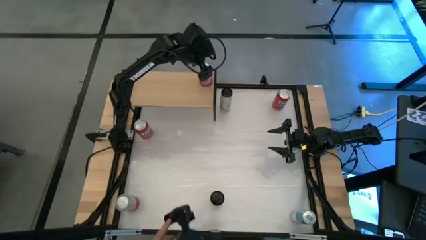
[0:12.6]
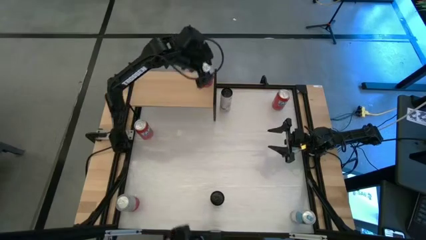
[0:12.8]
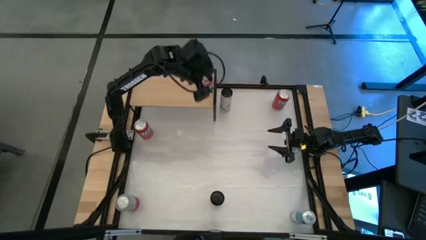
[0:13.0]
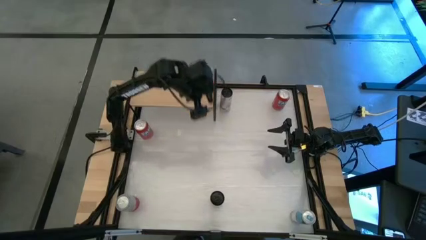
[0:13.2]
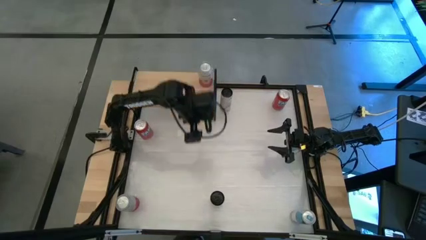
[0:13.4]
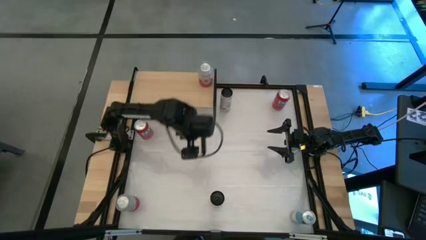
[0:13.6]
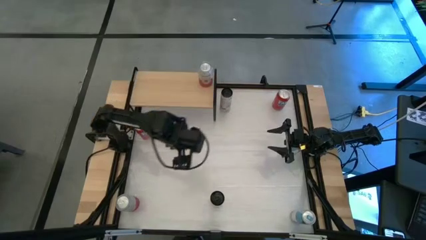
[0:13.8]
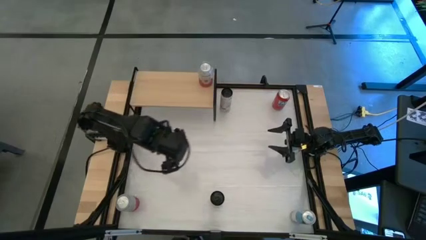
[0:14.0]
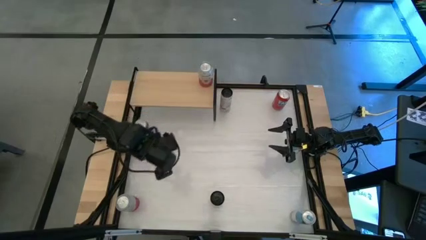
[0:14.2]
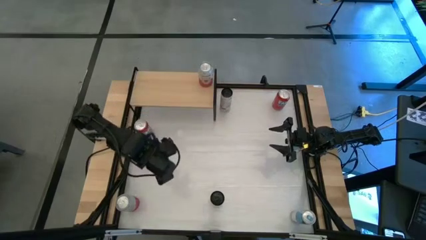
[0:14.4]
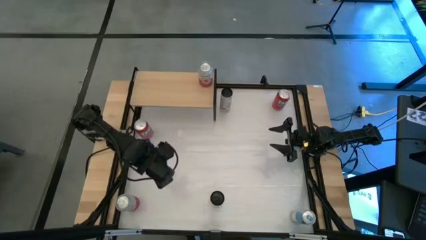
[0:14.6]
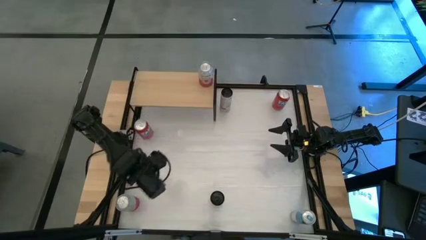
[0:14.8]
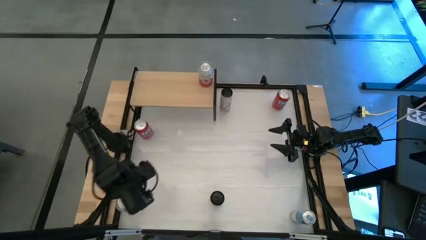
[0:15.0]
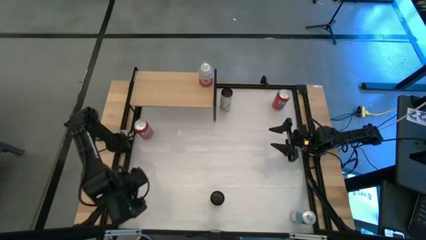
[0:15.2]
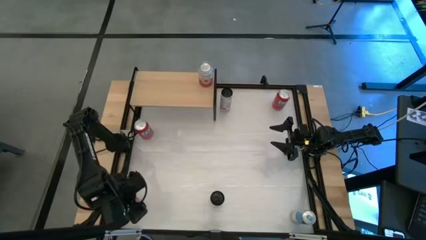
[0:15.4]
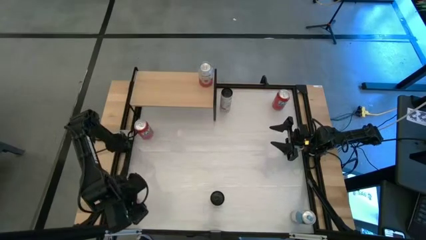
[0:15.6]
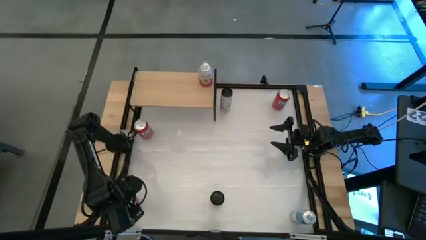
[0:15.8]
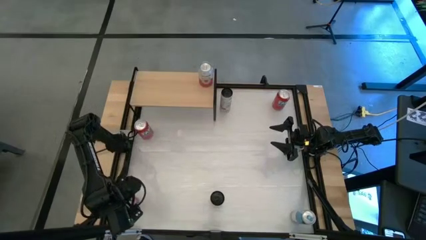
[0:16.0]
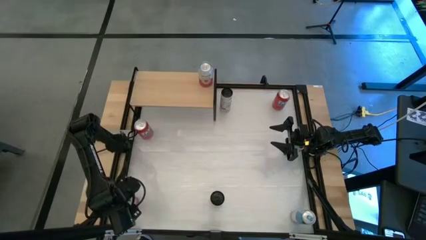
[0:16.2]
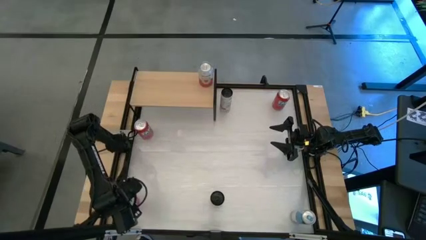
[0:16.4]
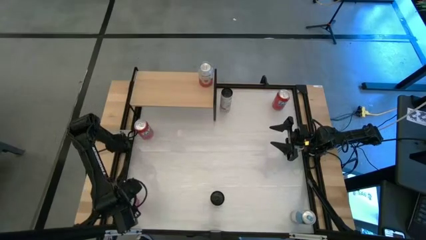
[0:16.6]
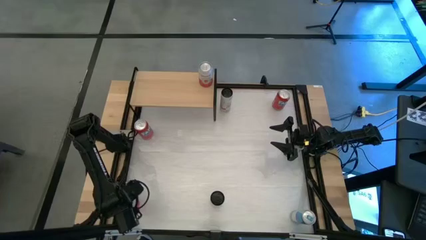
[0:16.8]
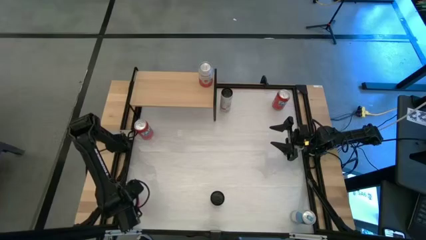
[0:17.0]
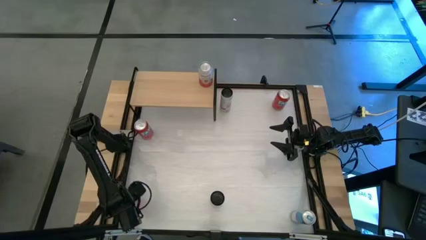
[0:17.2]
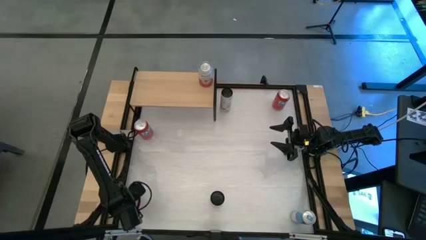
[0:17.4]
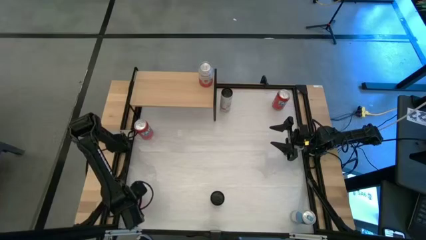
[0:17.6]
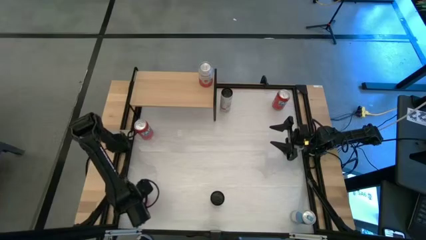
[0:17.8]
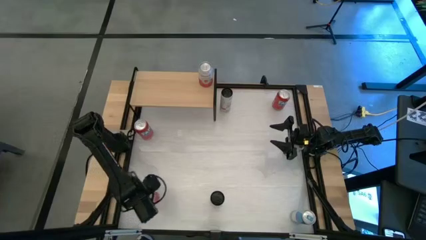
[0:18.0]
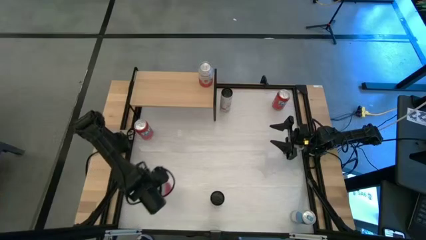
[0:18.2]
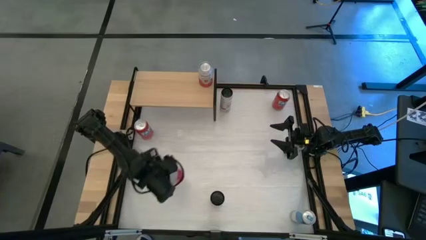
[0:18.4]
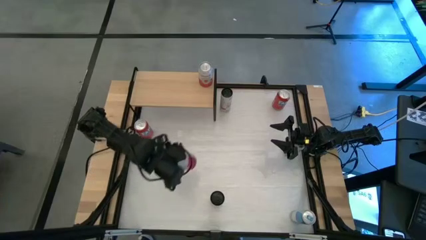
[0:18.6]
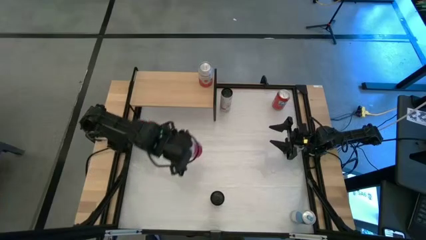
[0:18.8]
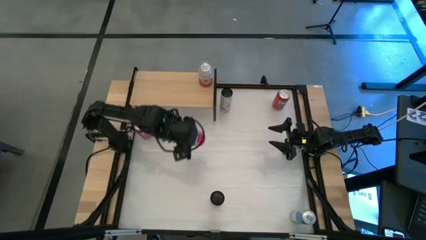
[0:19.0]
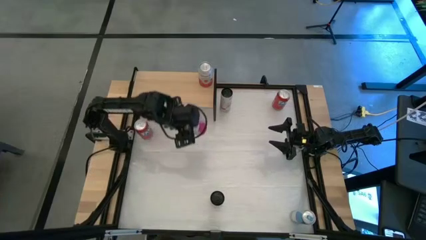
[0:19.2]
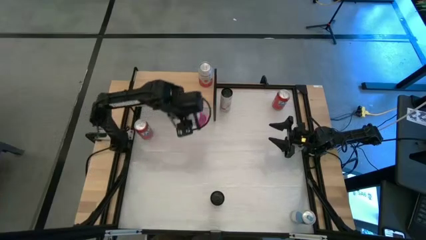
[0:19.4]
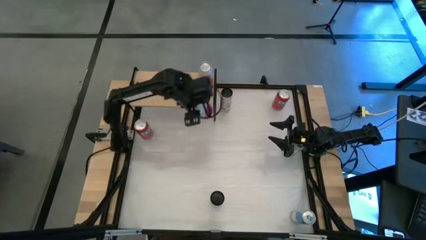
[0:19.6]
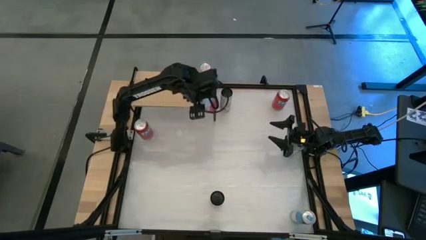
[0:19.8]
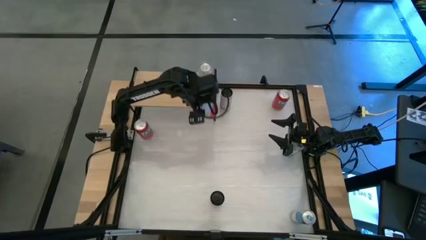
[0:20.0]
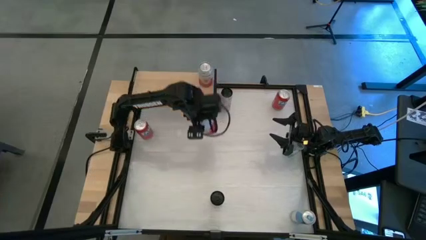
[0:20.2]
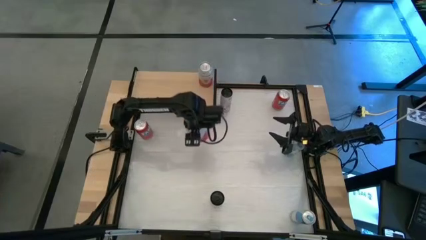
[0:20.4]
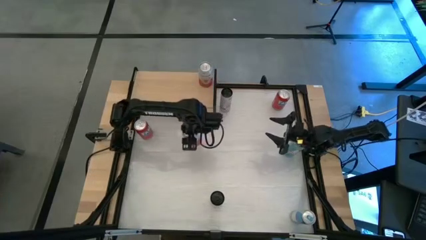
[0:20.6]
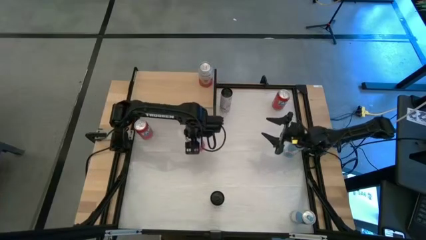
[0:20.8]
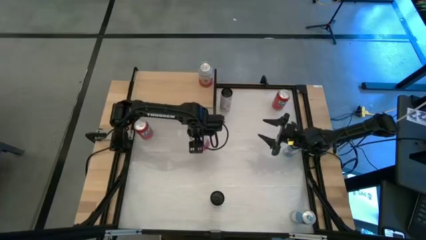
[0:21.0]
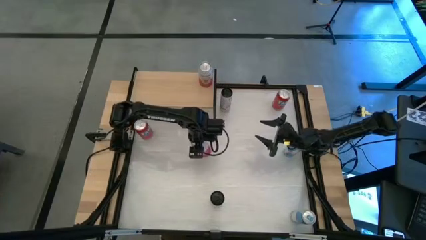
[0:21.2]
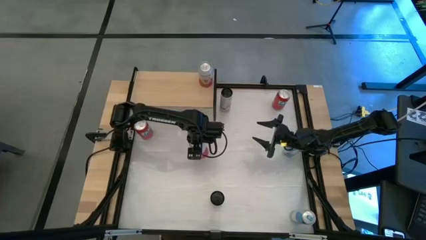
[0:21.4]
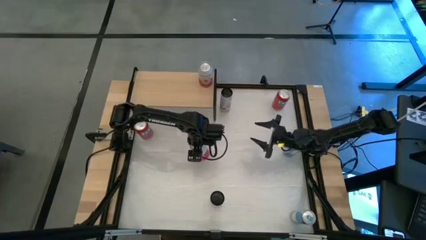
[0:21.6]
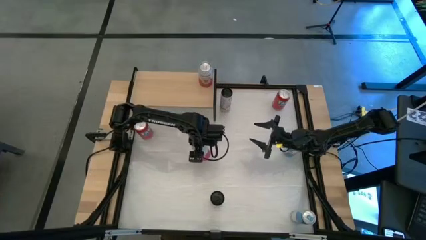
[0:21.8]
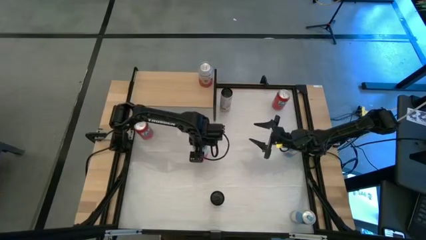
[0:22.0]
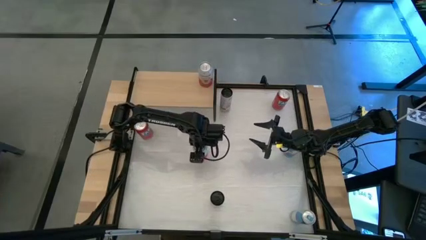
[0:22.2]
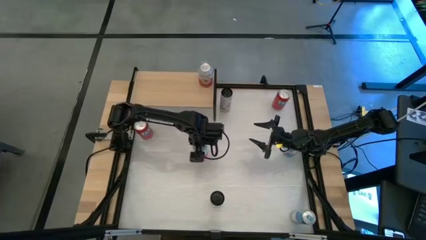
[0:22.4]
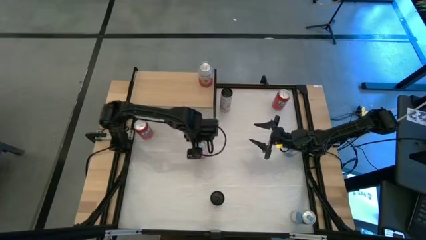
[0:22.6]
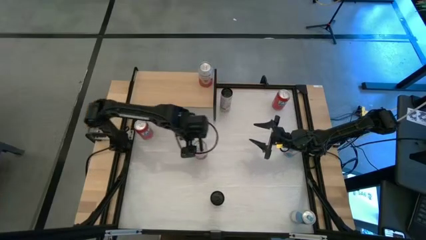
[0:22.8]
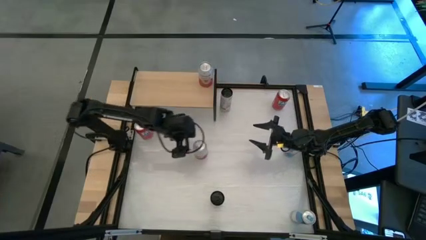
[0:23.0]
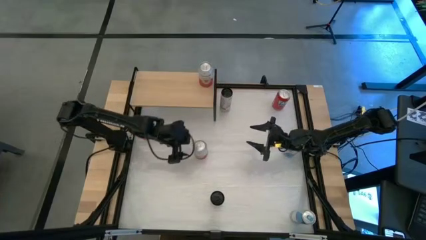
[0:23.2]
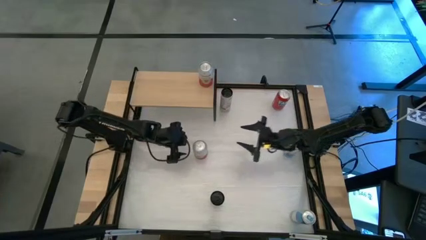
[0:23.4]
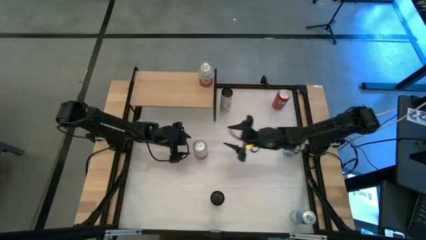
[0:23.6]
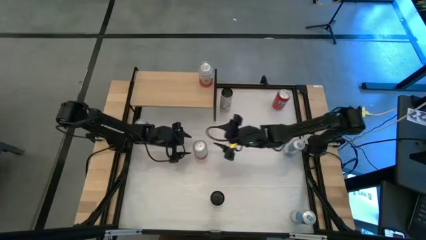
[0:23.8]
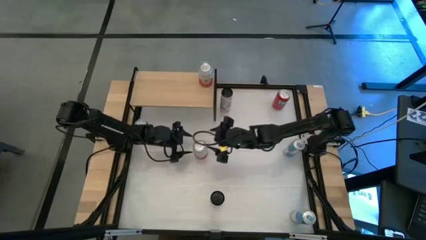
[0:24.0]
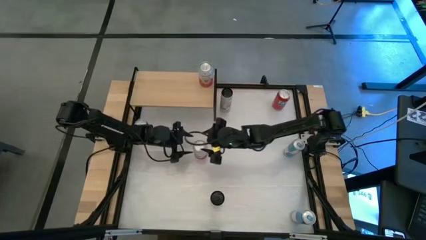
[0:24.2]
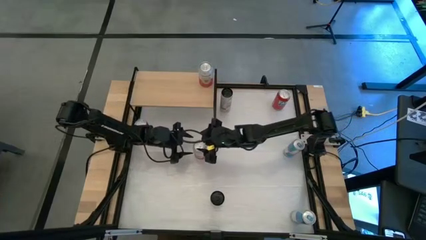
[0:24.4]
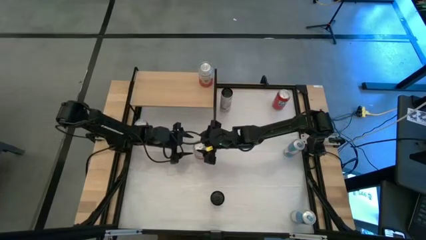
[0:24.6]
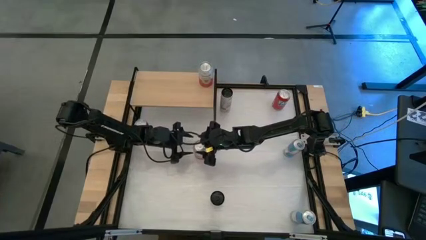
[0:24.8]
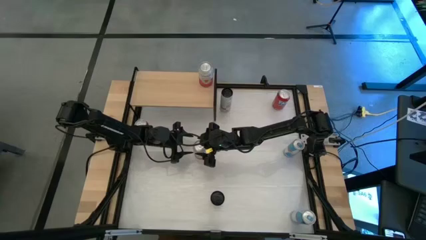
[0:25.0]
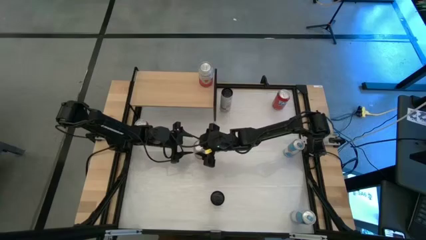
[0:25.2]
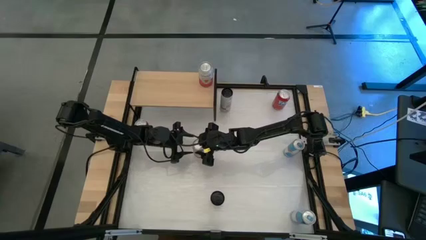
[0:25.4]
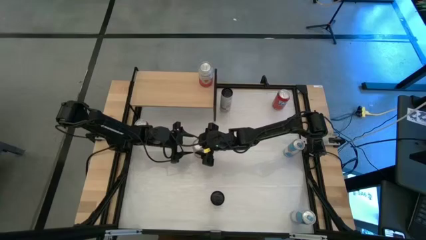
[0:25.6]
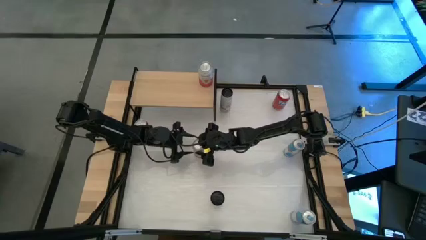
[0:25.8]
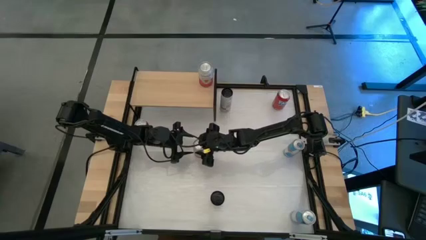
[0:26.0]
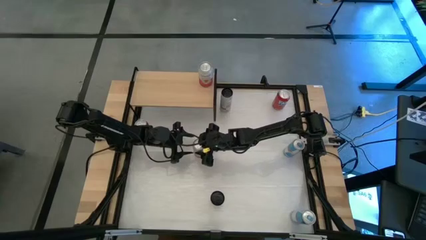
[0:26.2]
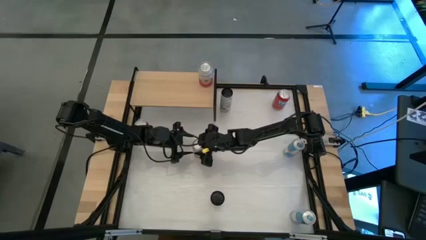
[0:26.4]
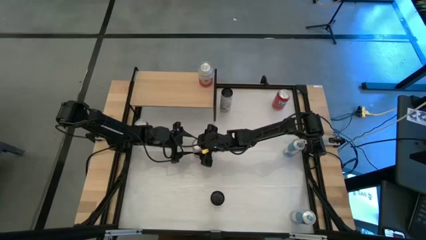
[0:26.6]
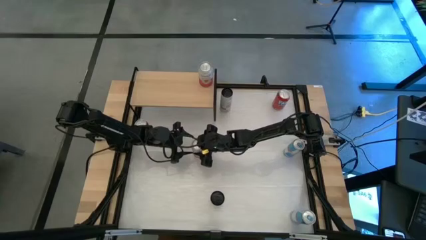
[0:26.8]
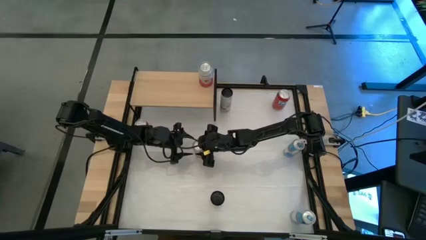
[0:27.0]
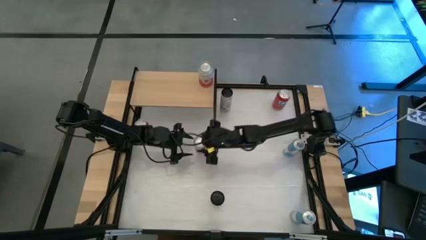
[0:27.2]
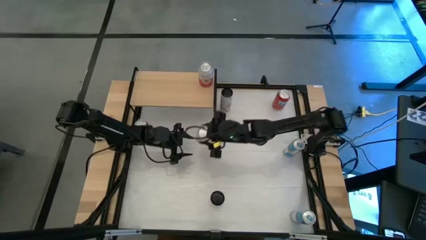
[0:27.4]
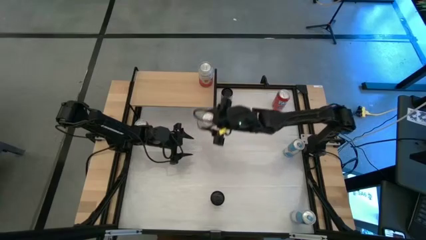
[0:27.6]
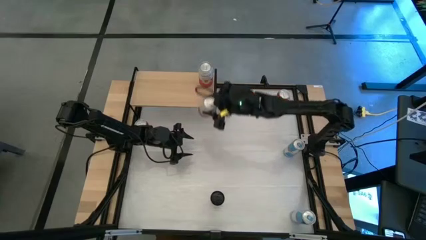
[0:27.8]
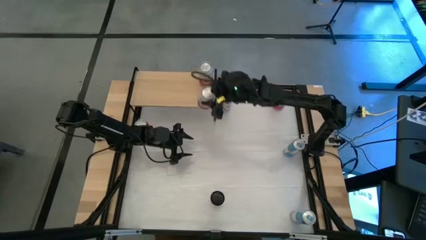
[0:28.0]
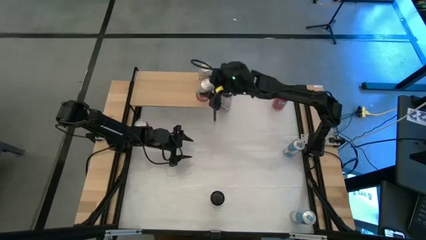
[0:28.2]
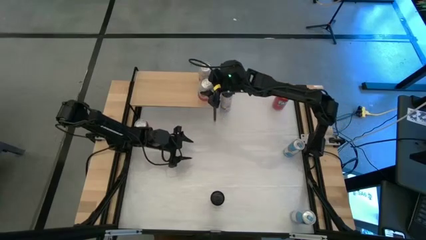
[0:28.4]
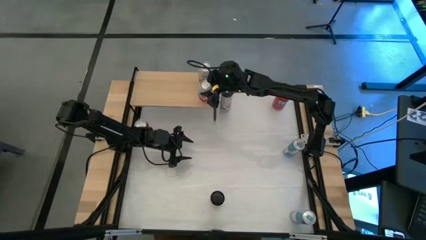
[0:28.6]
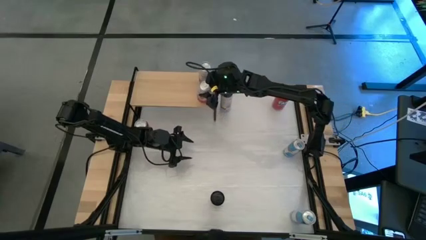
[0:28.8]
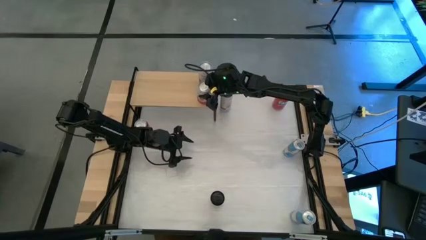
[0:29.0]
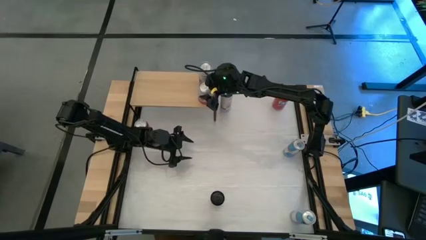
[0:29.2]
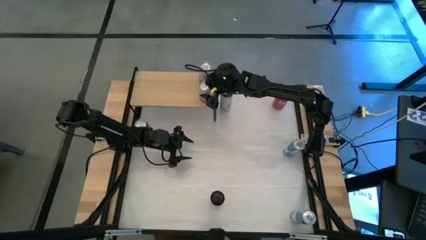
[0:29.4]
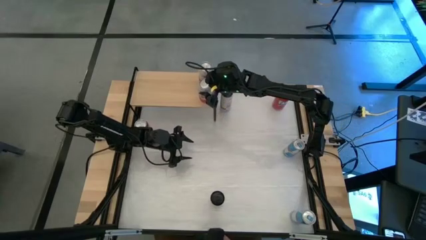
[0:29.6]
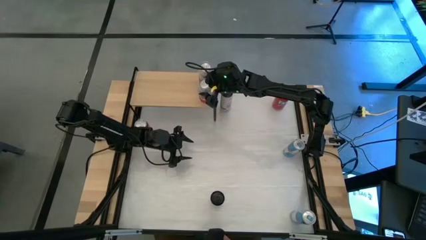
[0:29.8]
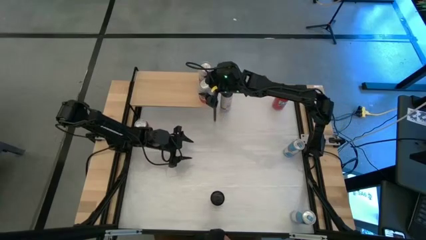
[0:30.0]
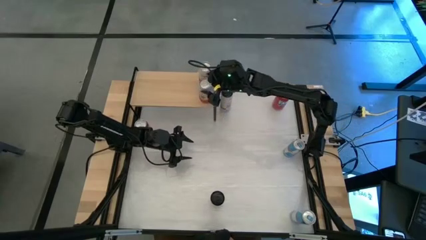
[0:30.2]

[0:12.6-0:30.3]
Task: Place canned beverage on shelf
Put the pink soda can on the shelf aligned with the other pink soda can
